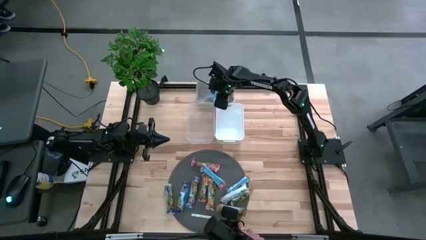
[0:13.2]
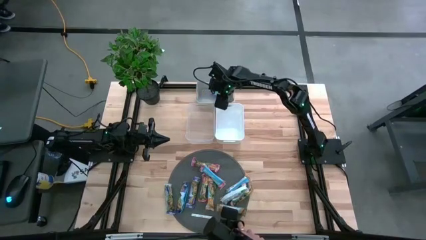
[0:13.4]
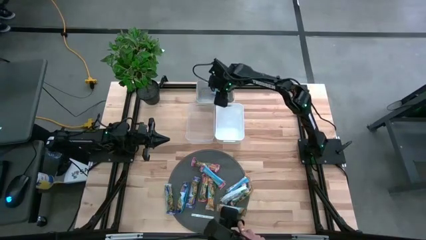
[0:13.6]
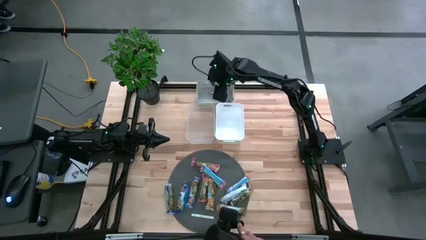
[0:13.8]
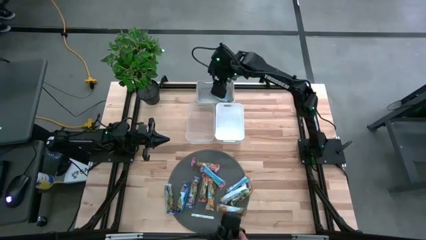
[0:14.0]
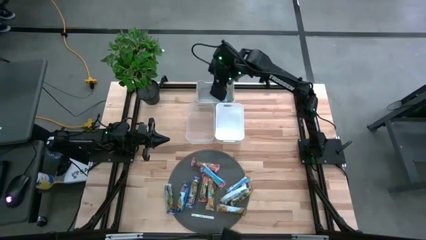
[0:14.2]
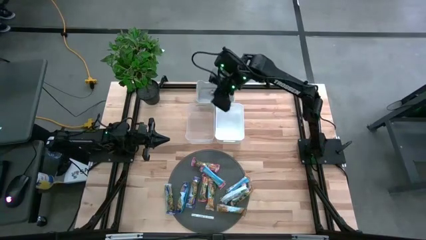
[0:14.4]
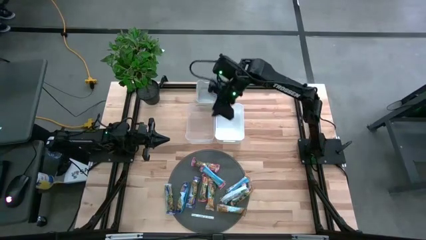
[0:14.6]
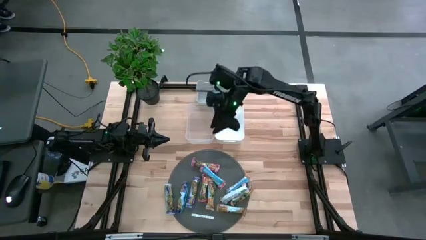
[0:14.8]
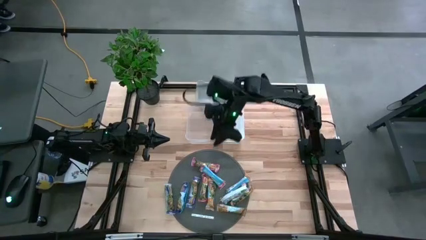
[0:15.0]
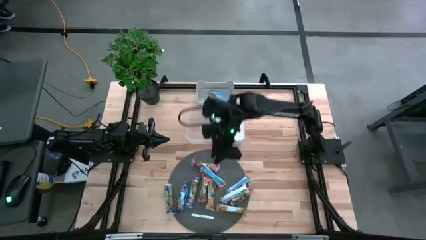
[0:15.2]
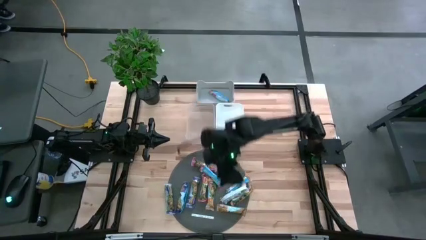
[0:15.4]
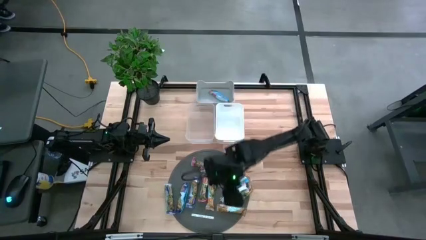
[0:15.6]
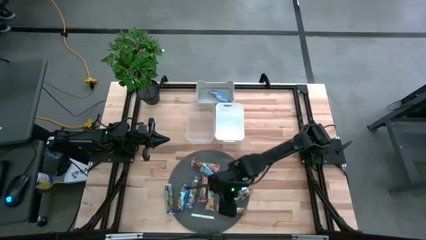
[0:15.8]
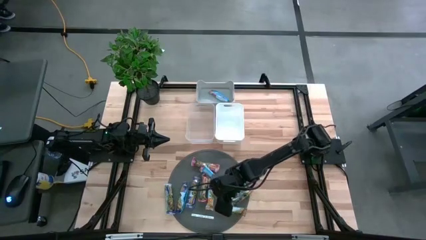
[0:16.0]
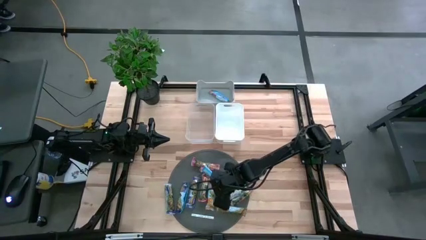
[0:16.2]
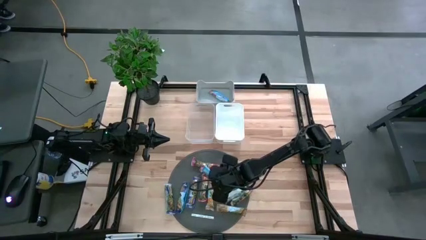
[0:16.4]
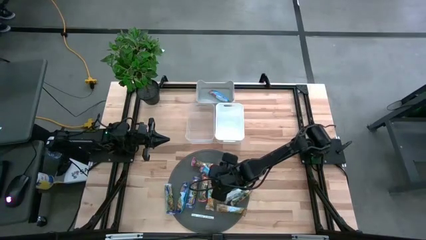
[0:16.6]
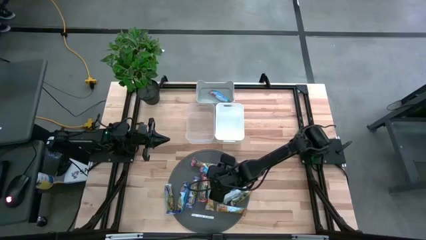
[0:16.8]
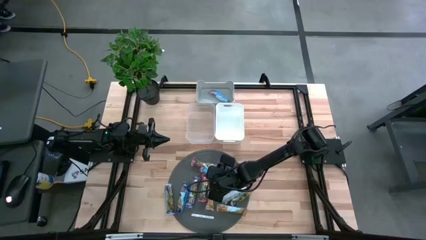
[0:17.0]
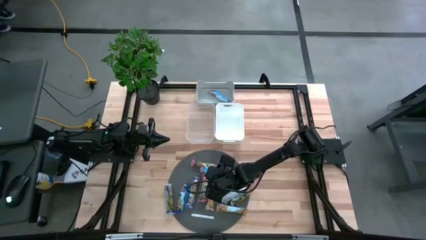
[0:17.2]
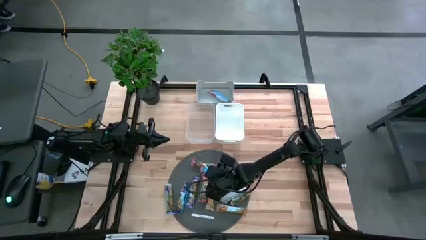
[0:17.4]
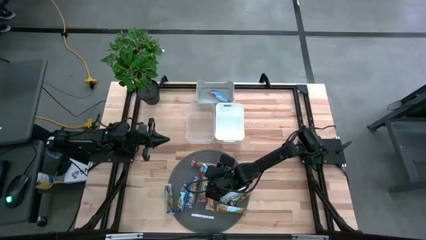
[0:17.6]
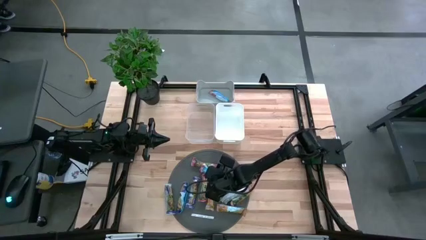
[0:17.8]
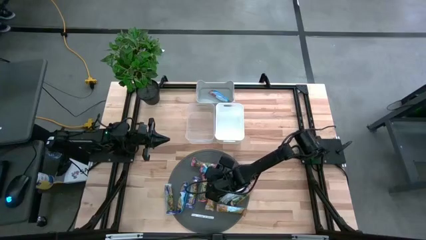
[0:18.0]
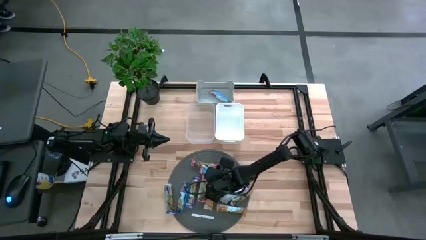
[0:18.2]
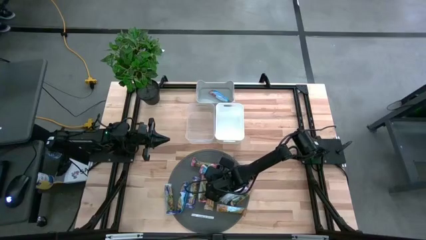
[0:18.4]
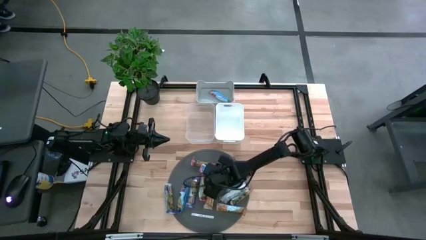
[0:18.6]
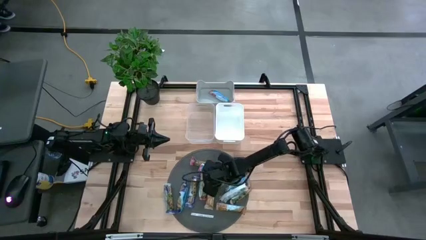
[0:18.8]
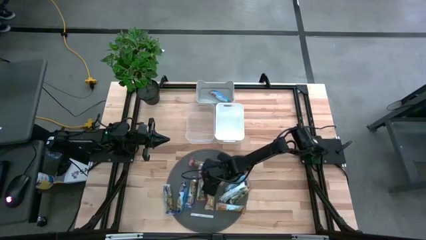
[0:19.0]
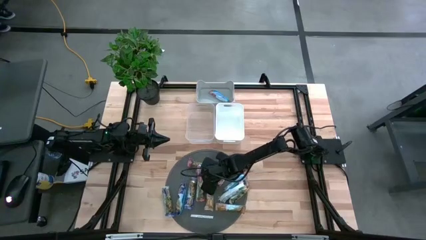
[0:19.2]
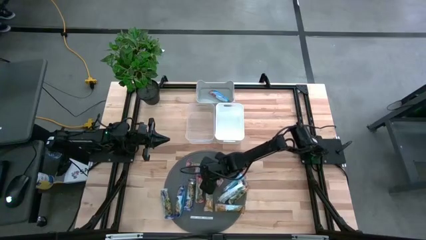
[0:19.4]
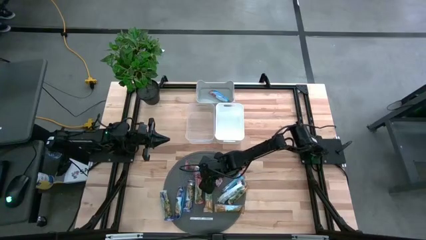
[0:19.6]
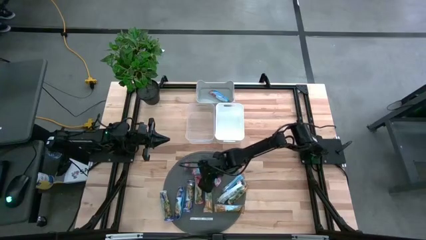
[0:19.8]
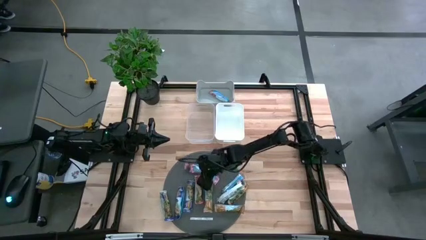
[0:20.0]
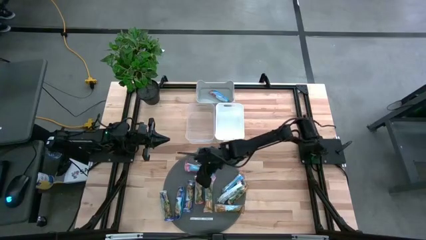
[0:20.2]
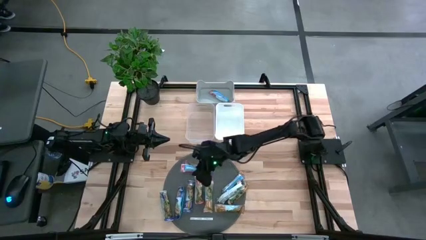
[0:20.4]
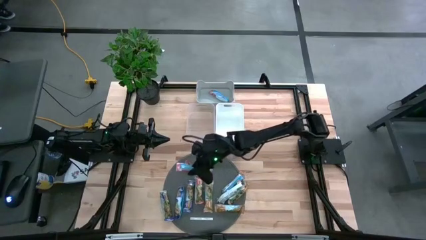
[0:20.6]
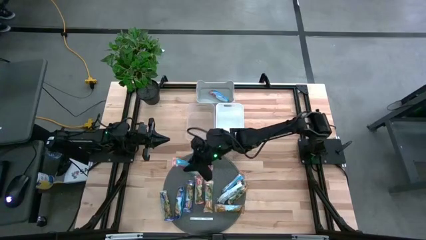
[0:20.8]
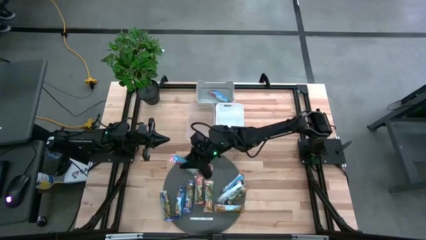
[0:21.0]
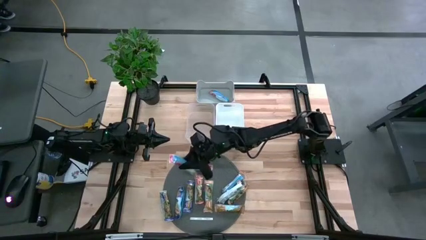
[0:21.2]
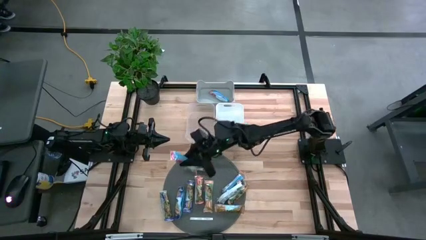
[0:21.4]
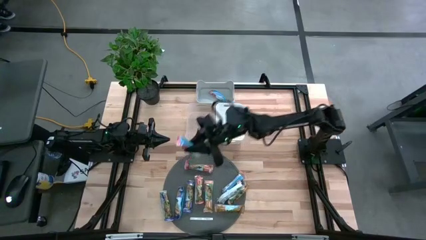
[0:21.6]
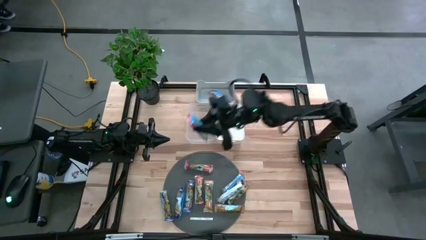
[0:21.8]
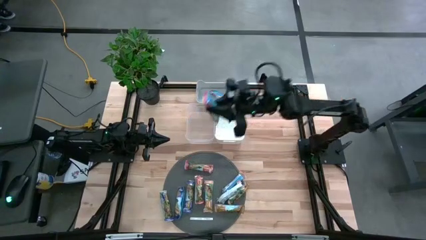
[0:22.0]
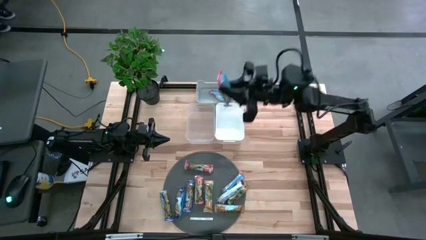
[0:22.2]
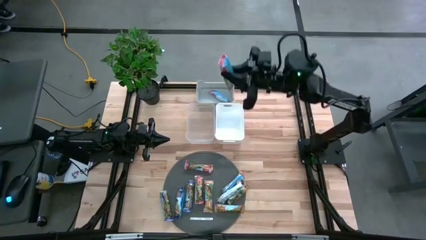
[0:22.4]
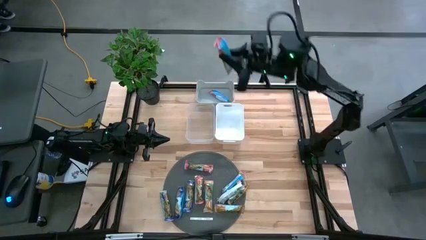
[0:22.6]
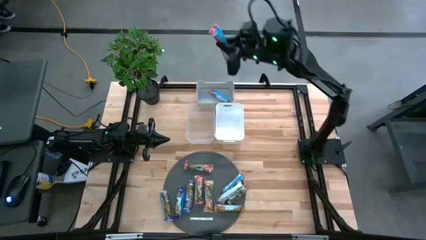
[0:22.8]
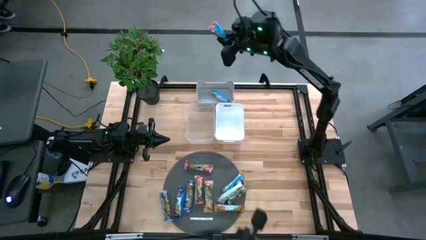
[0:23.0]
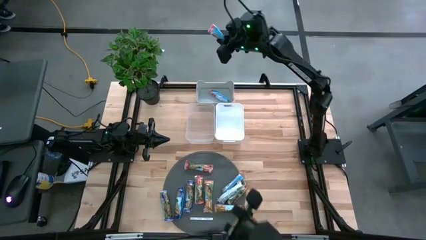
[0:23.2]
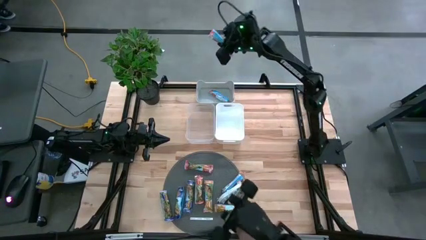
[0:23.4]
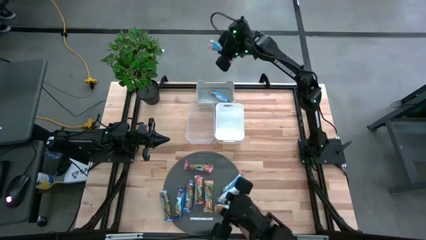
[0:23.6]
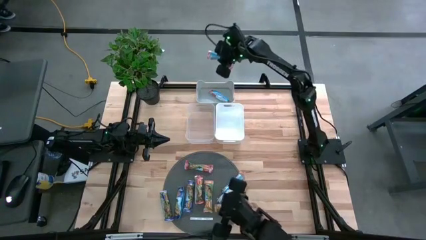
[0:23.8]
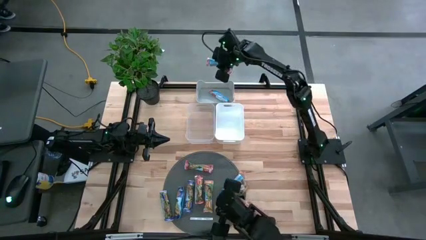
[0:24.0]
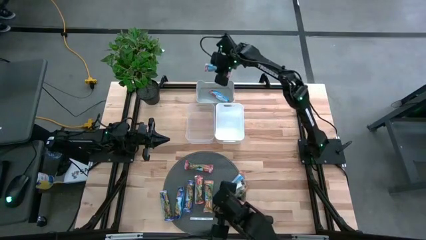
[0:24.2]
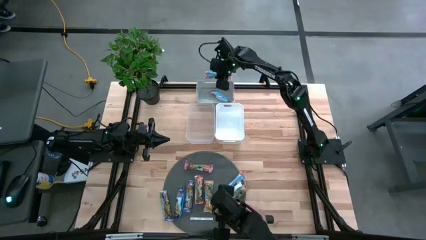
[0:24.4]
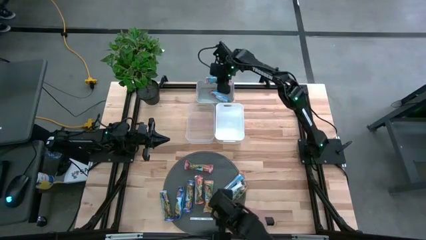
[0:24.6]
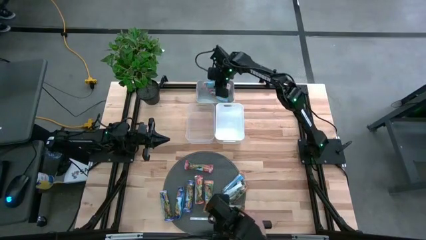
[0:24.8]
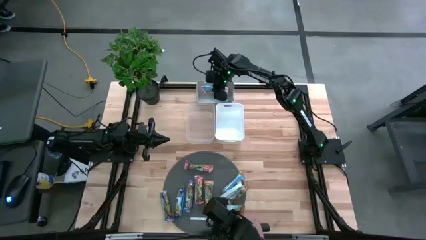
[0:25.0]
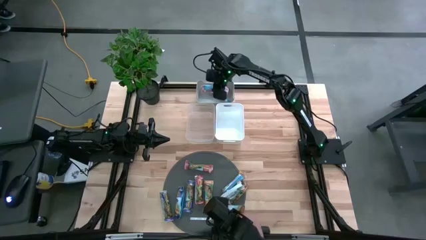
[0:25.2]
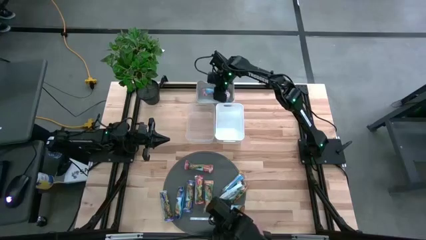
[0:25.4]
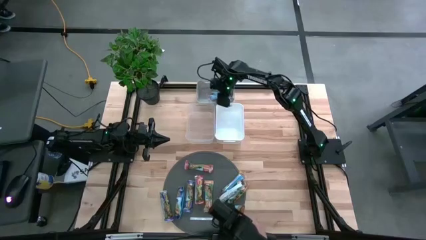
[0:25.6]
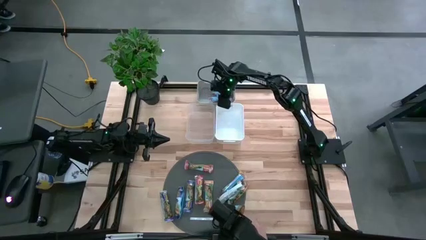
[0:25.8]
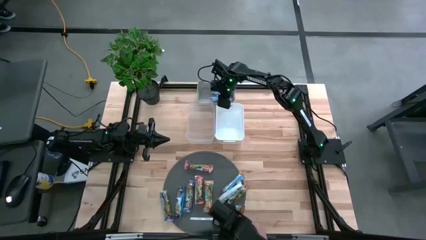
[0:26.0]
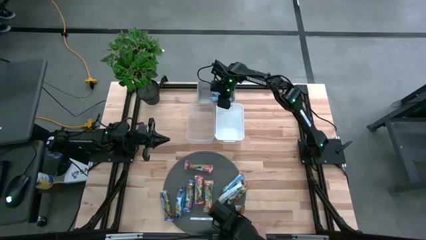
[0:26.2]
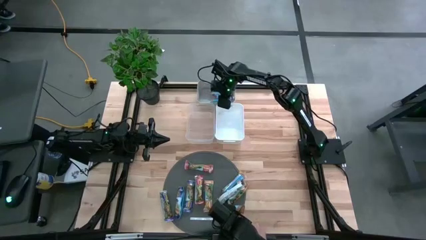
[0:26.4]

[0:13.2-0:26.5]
Task: Pick and place Granola Bars by type
Put the red granola bar into the gray bin
